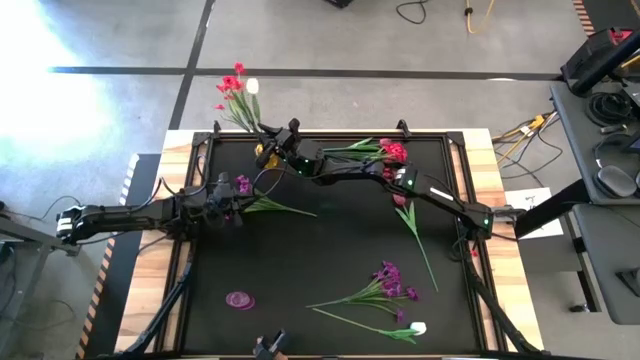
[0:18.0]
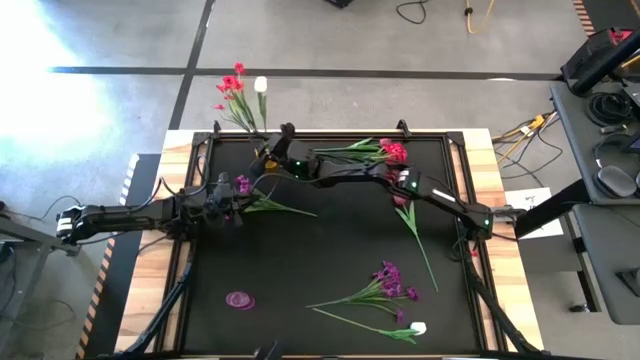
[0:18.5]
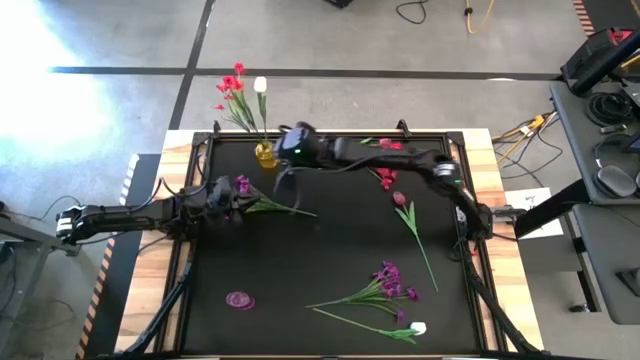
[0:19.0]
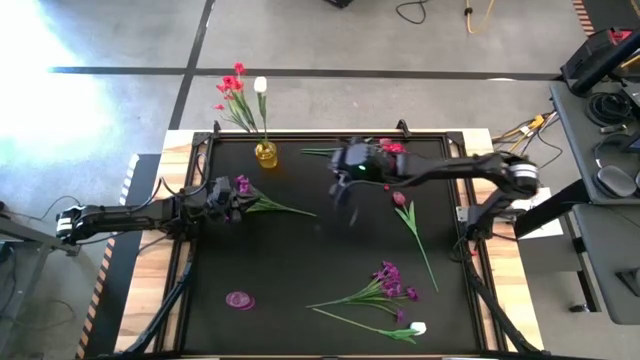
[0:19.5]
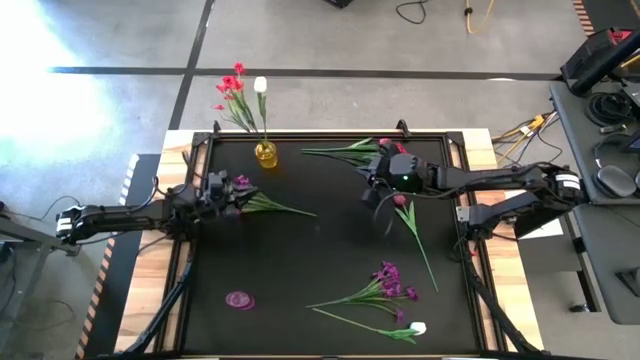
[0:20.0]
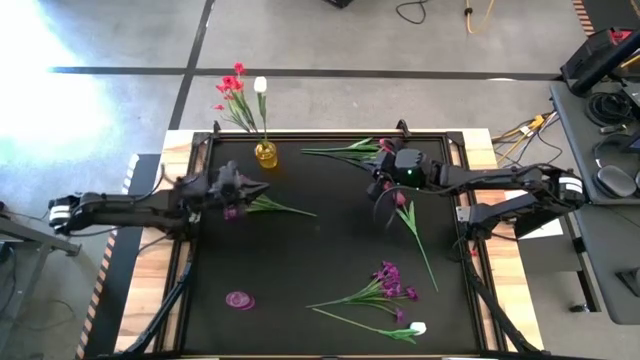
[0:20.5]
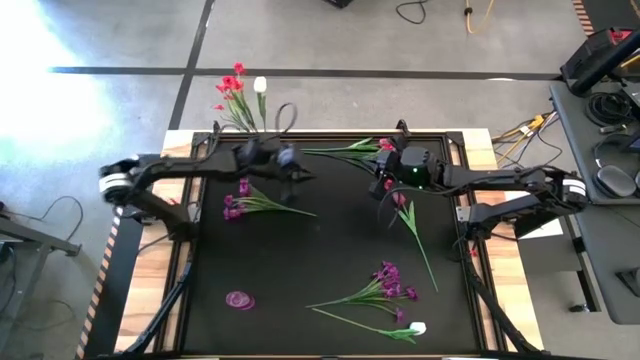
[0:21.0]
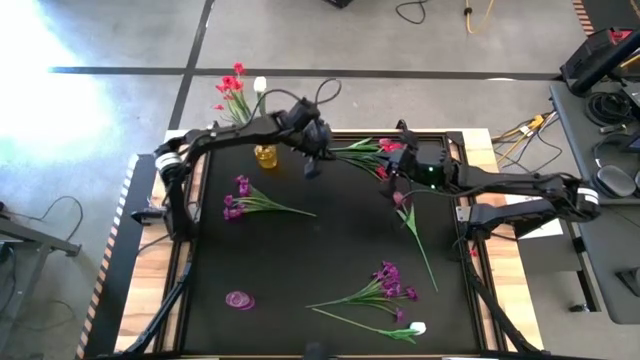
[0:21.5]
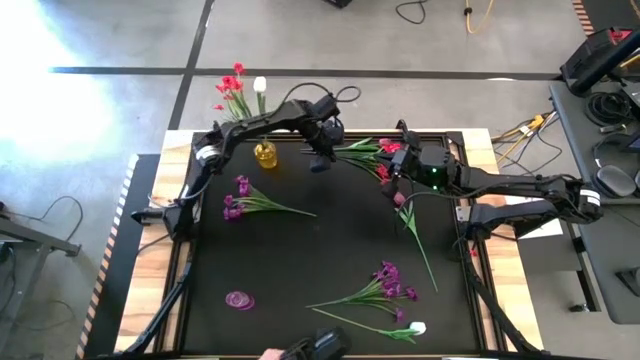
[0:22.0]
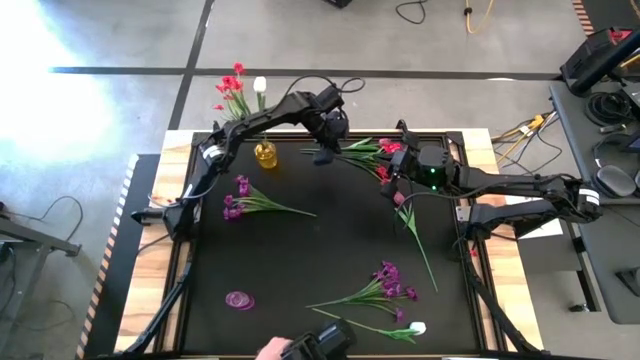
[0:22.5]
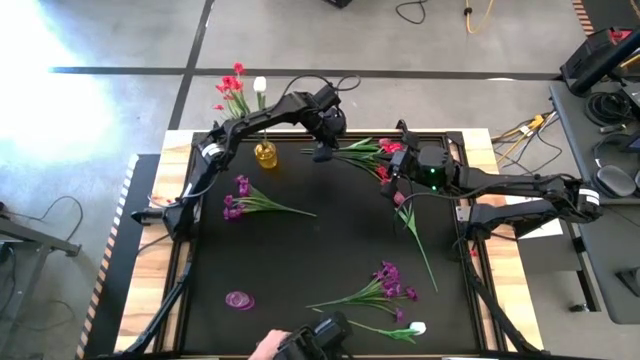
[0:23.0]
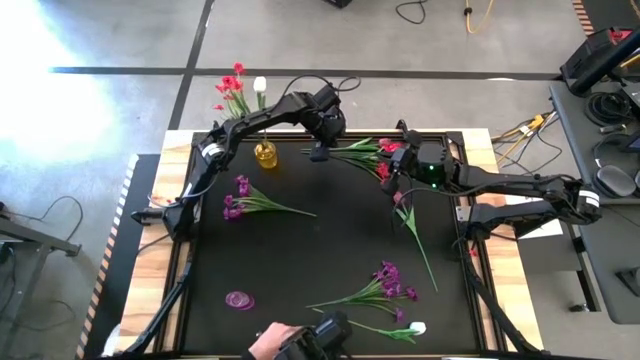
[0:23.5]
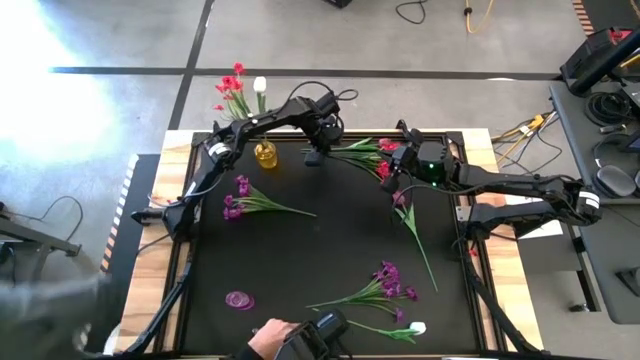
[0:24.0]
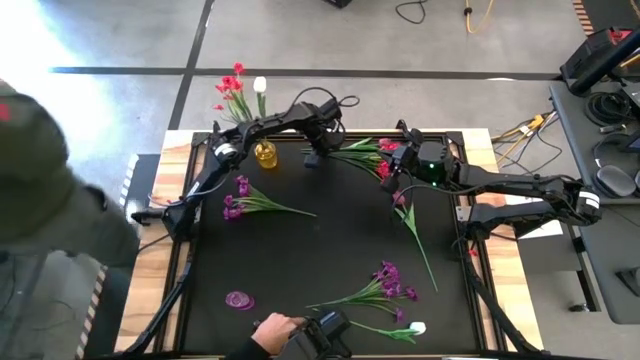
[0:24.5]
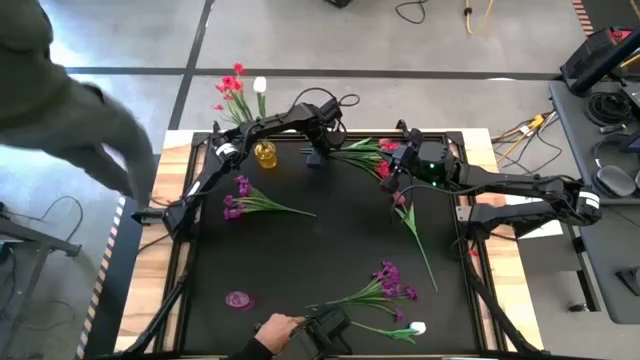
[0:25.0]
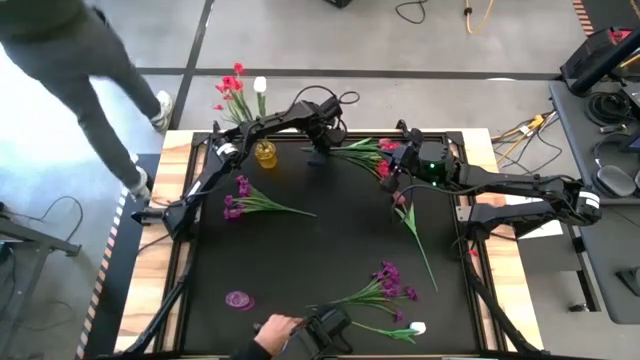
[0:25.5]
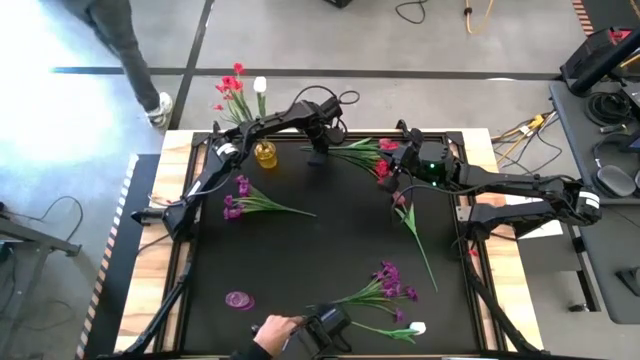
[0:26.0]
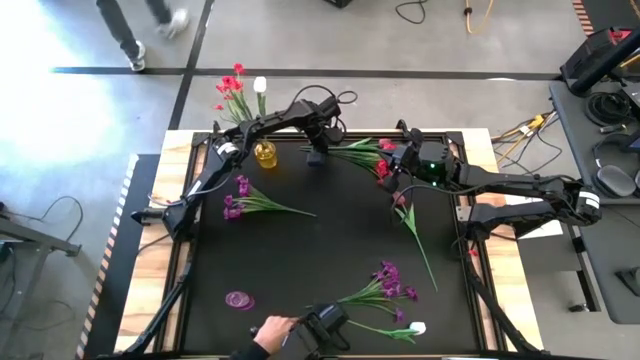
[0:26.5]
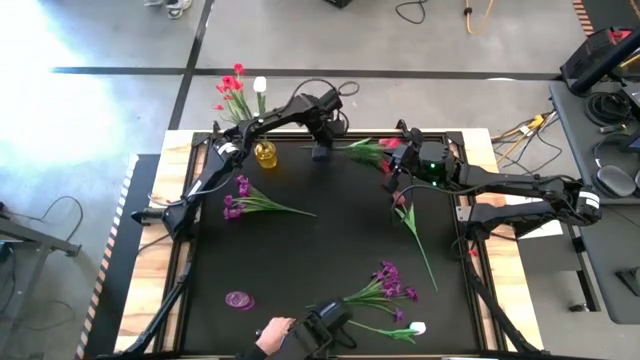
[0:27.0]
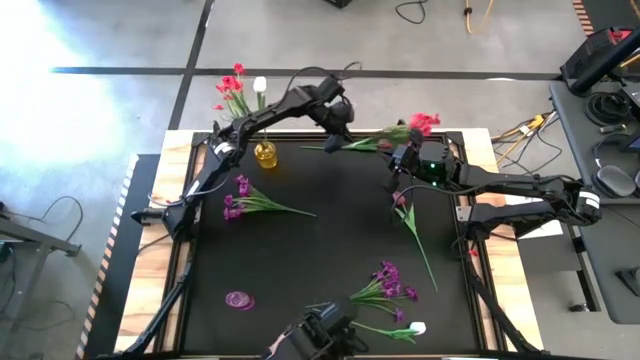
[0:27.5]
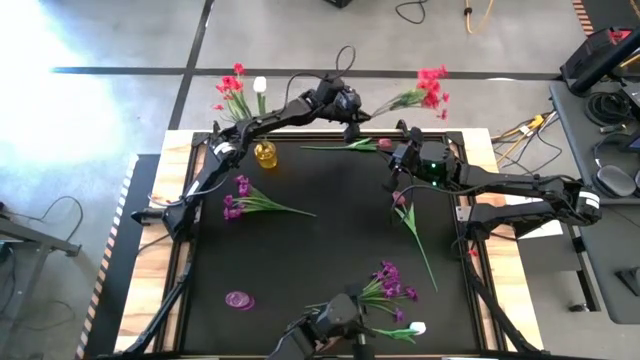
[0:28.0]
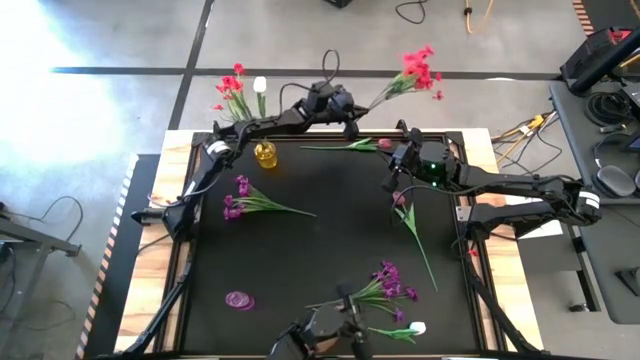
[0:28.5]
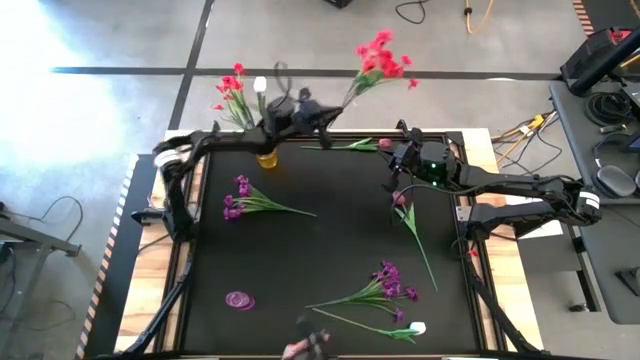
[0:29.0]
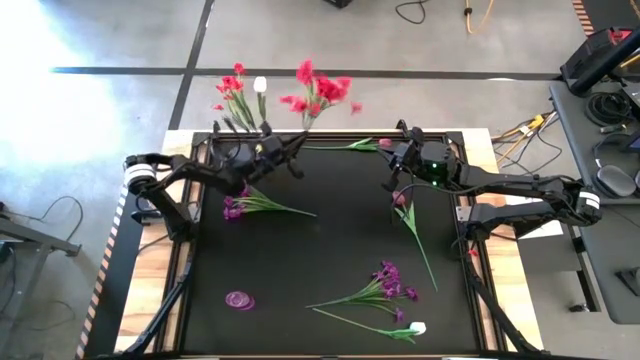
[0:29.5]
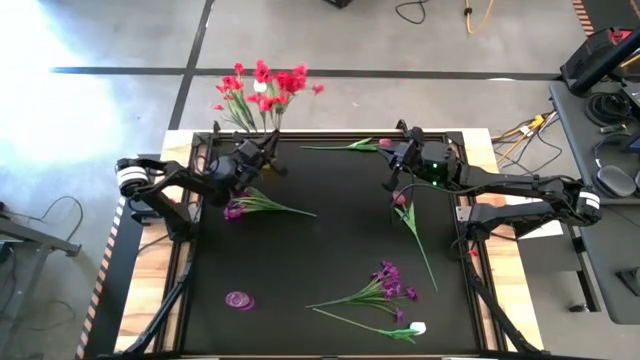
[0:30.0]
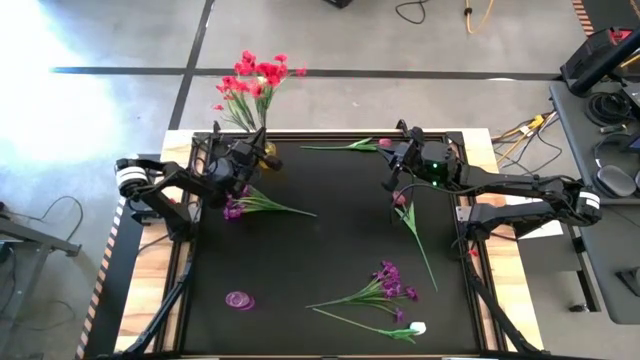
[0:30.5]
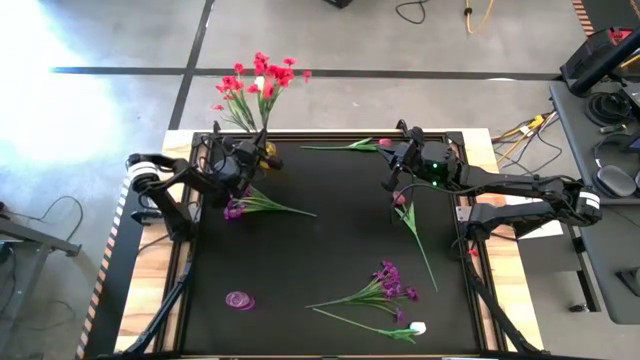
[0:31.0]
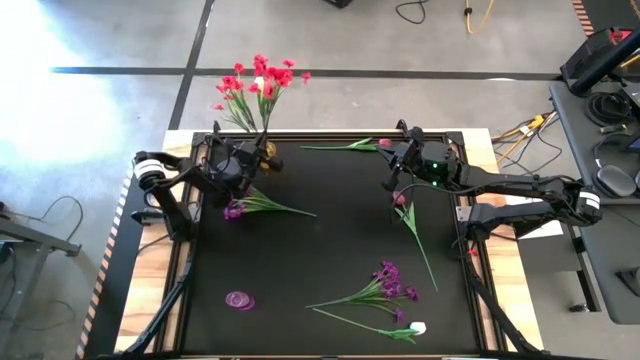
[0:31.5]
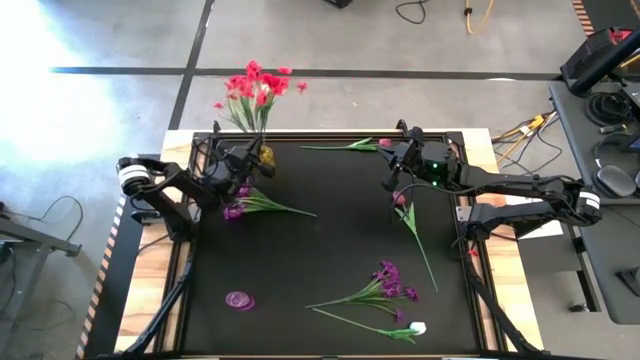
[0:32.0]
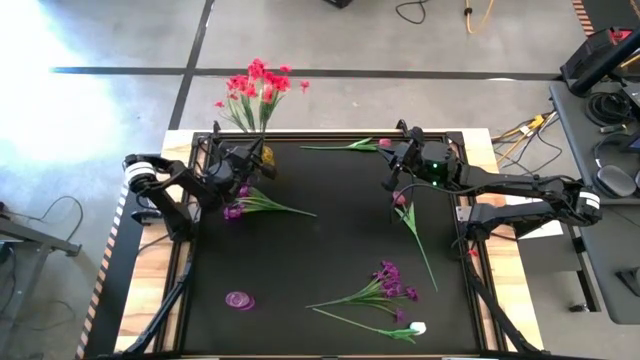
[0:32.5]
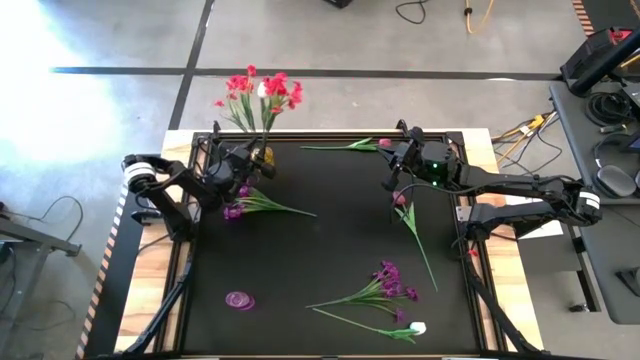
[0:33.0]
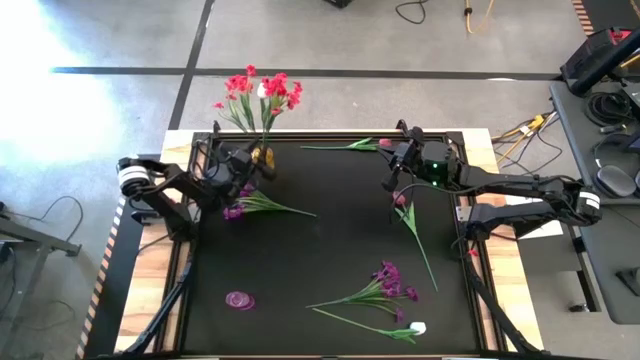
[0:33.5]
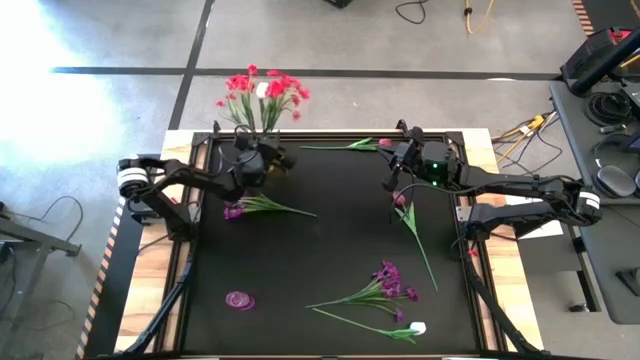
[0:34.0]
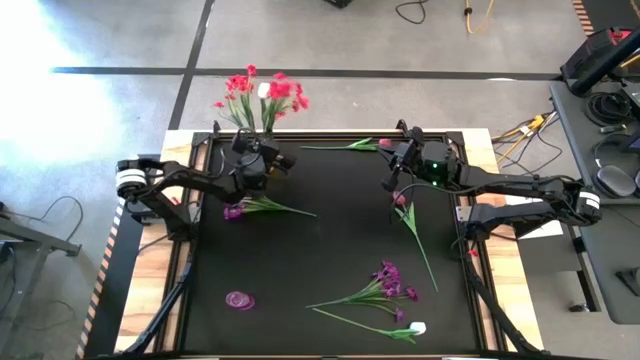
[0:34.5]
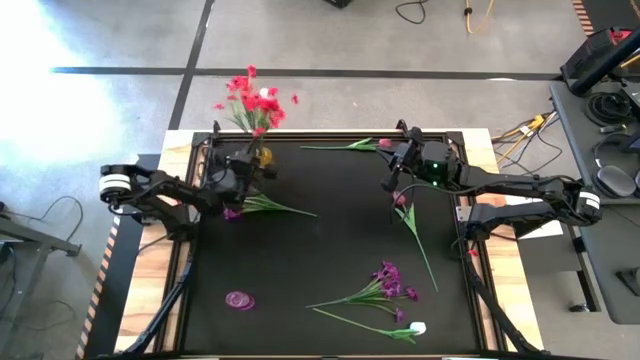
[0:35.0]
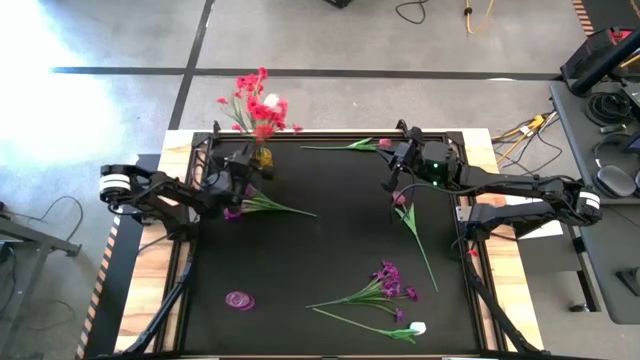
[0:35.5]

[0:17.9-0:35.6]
Task: Sort flowers into vase by color
Put the red flowers into the yellow vase
